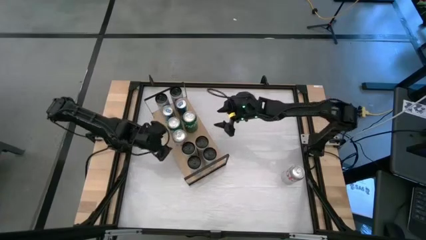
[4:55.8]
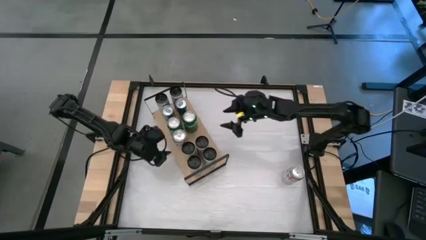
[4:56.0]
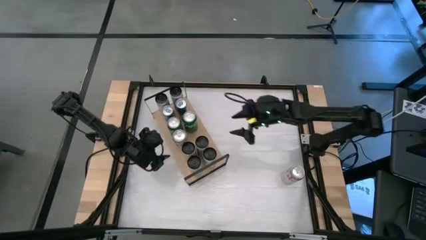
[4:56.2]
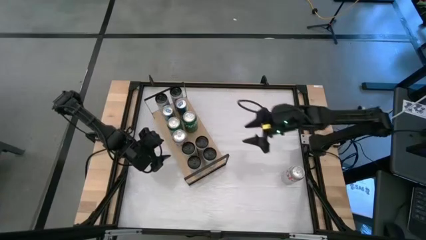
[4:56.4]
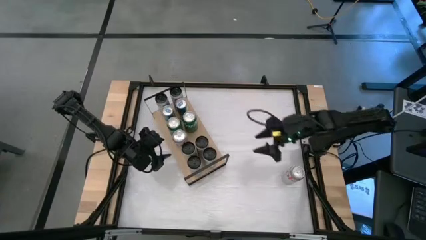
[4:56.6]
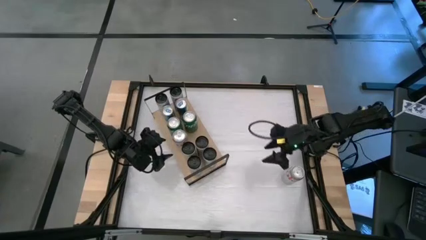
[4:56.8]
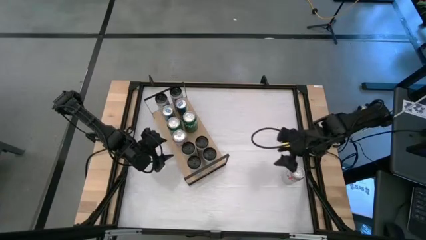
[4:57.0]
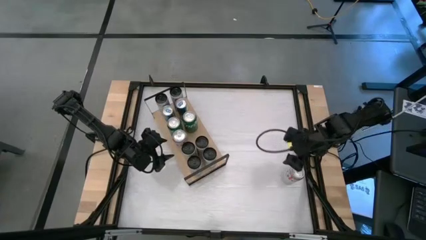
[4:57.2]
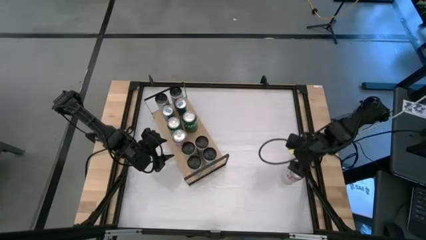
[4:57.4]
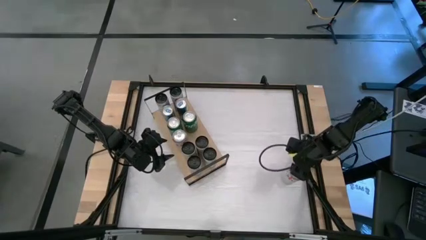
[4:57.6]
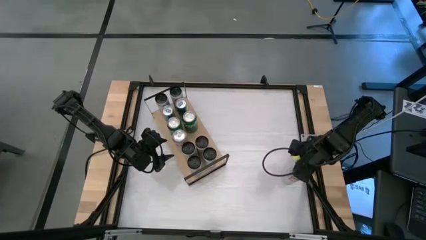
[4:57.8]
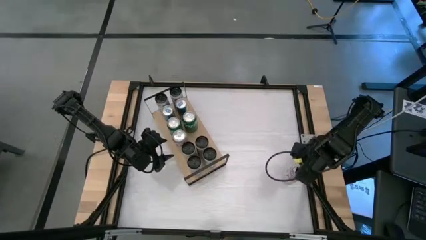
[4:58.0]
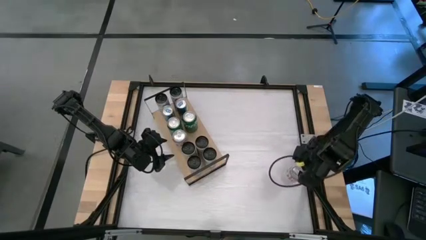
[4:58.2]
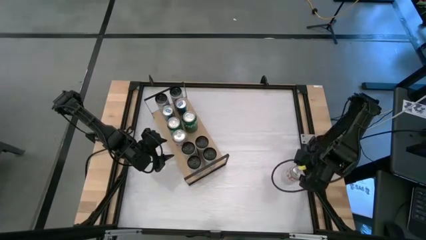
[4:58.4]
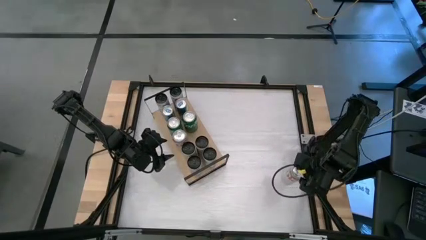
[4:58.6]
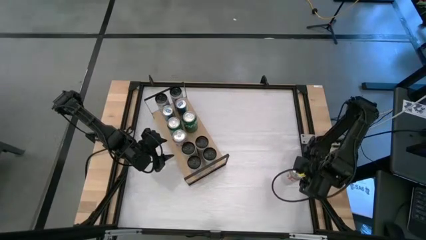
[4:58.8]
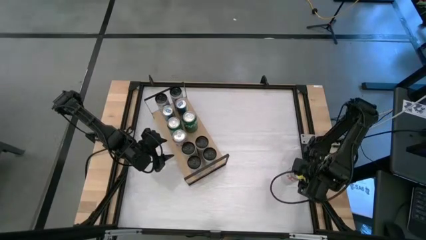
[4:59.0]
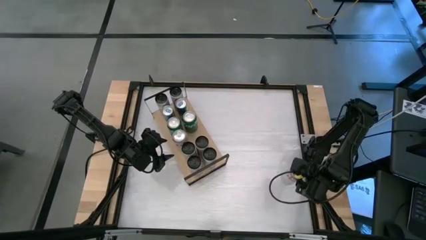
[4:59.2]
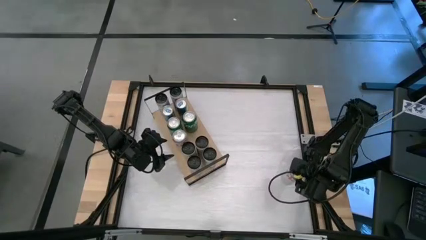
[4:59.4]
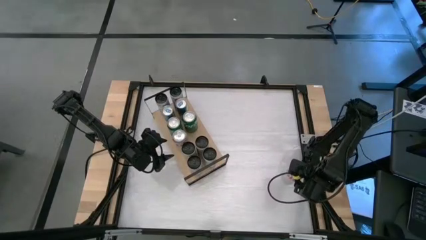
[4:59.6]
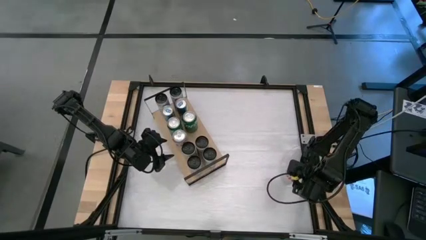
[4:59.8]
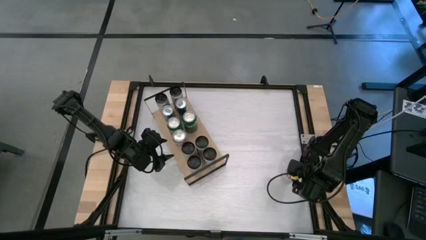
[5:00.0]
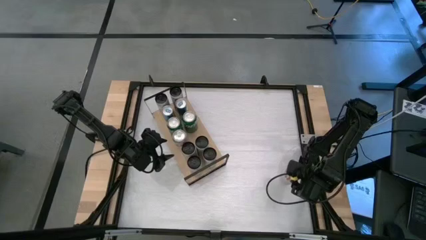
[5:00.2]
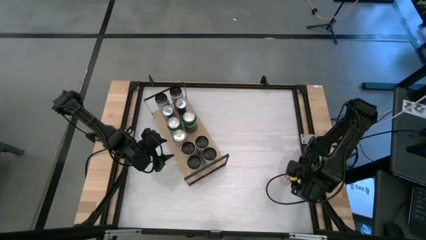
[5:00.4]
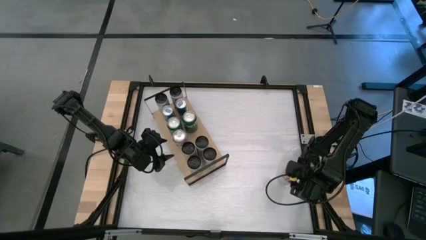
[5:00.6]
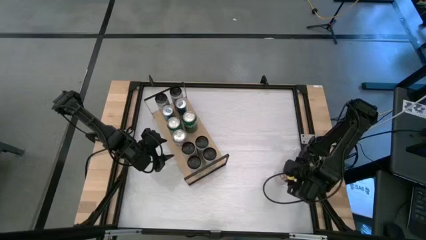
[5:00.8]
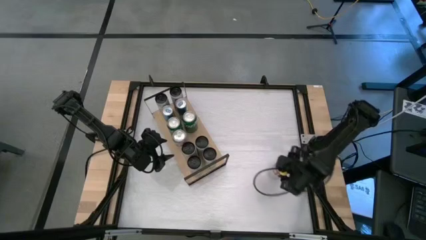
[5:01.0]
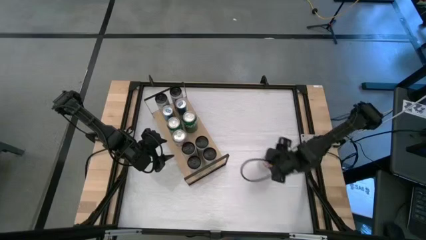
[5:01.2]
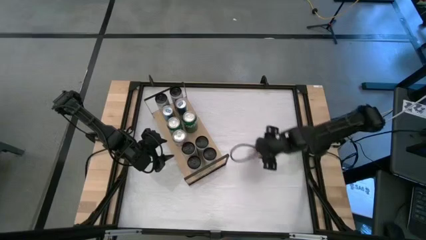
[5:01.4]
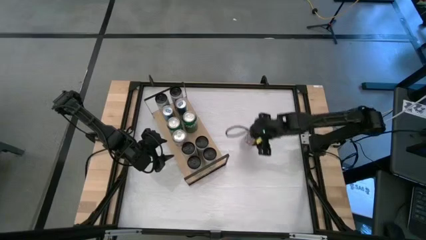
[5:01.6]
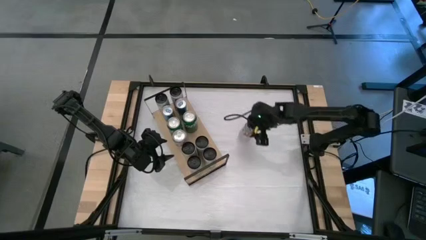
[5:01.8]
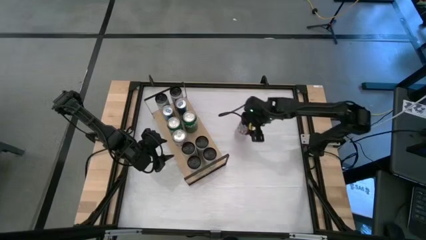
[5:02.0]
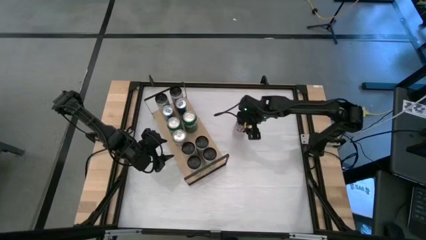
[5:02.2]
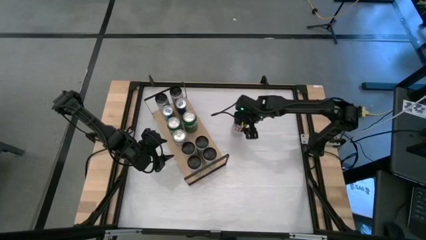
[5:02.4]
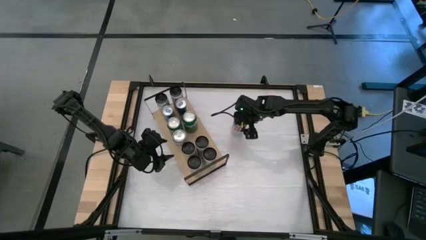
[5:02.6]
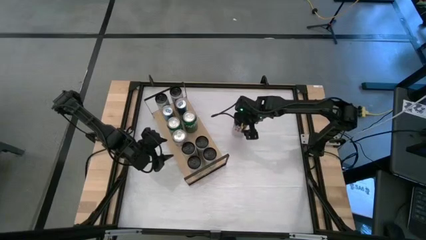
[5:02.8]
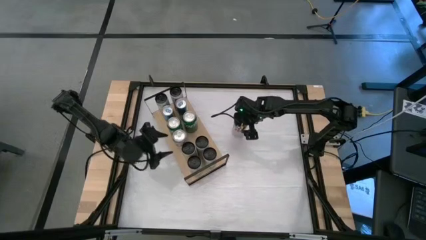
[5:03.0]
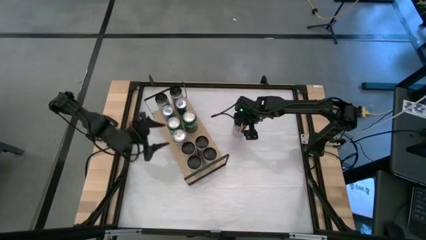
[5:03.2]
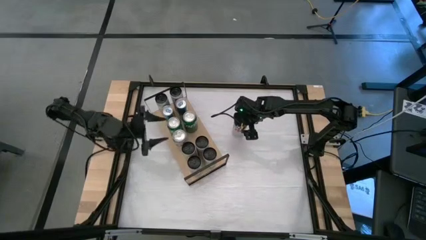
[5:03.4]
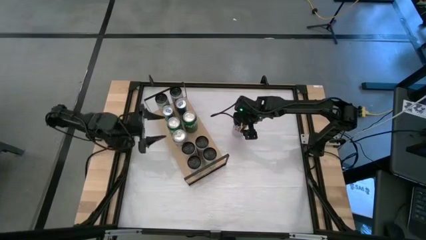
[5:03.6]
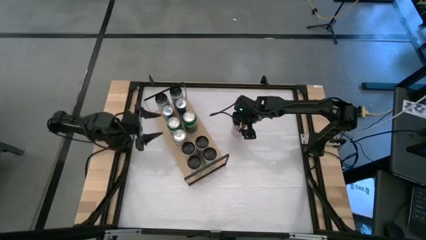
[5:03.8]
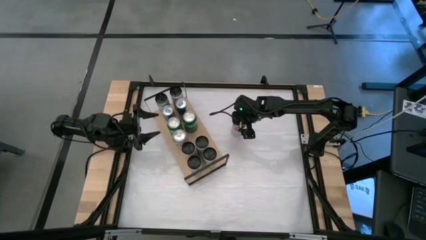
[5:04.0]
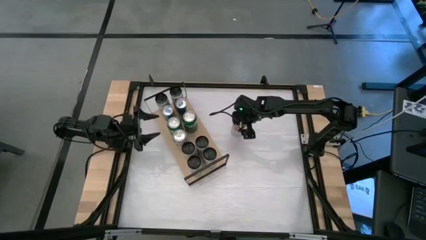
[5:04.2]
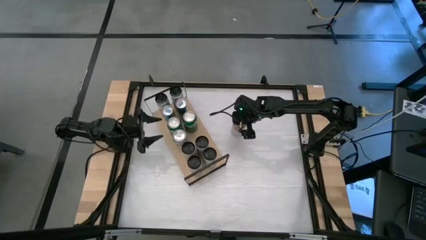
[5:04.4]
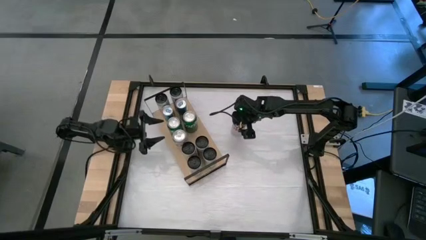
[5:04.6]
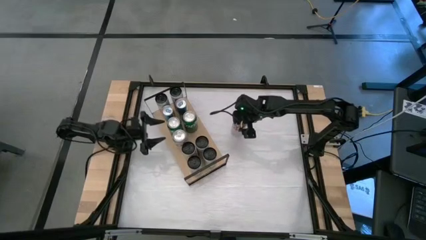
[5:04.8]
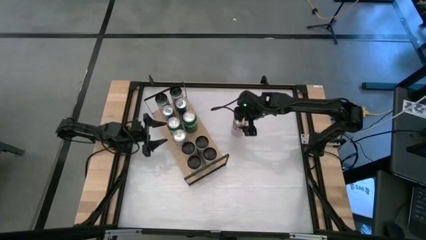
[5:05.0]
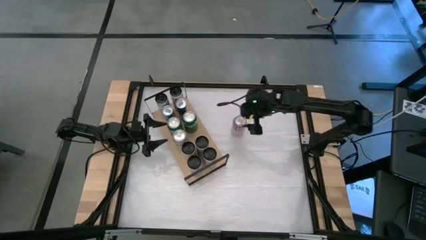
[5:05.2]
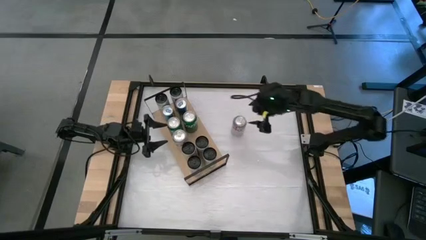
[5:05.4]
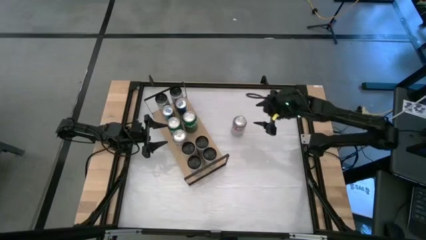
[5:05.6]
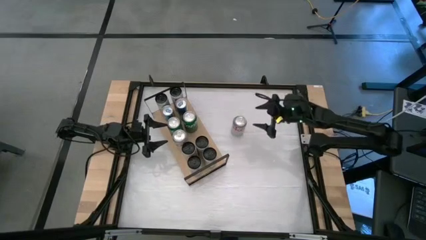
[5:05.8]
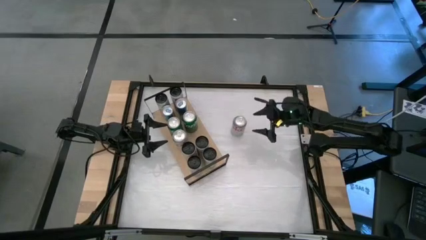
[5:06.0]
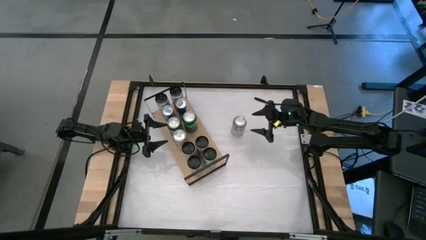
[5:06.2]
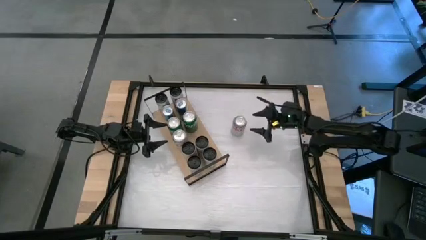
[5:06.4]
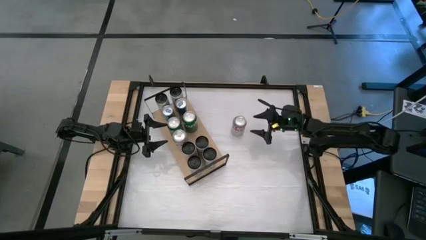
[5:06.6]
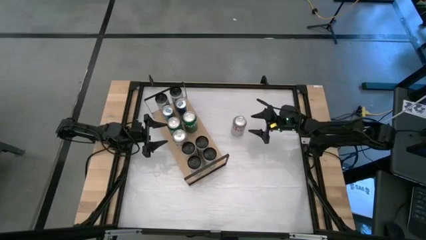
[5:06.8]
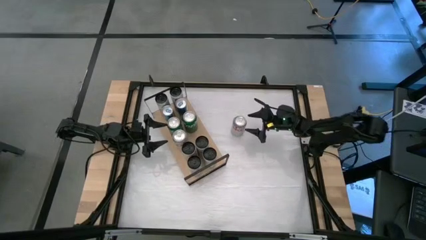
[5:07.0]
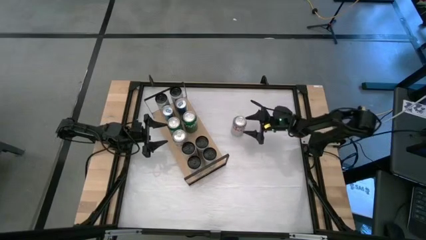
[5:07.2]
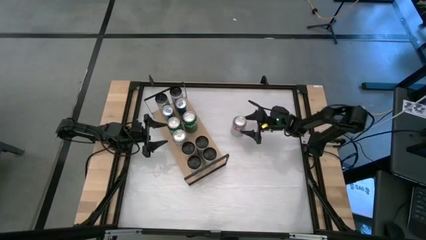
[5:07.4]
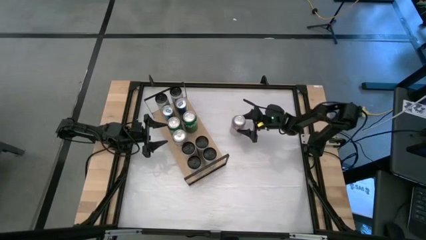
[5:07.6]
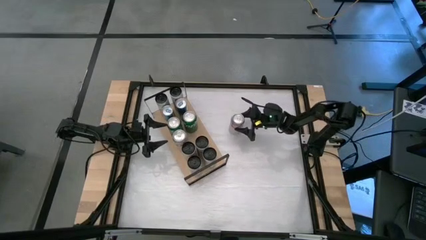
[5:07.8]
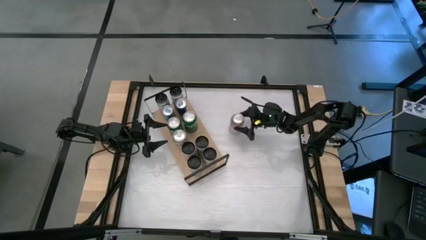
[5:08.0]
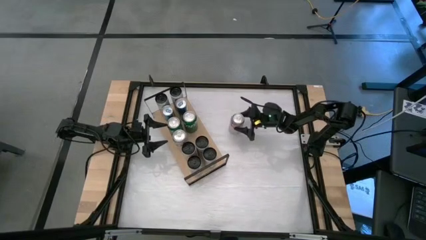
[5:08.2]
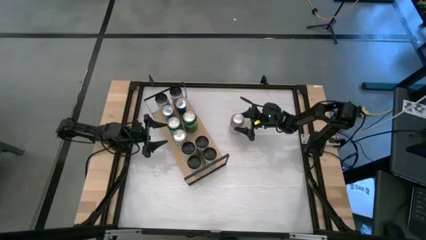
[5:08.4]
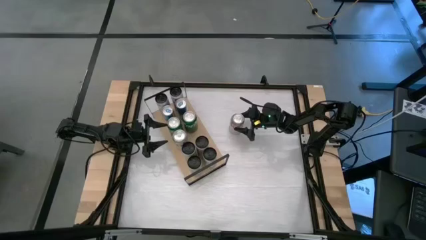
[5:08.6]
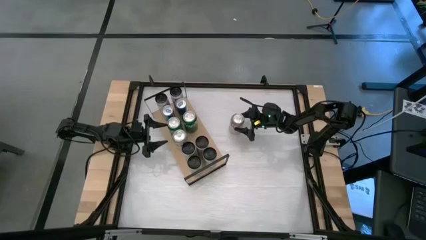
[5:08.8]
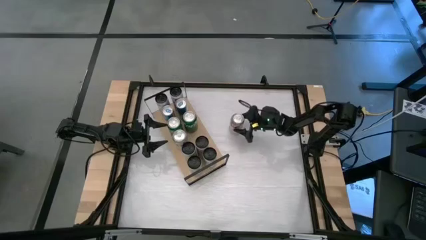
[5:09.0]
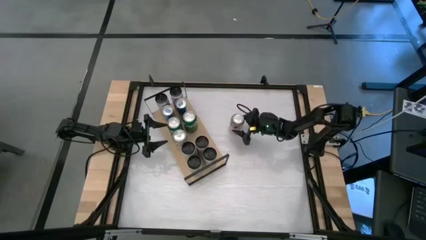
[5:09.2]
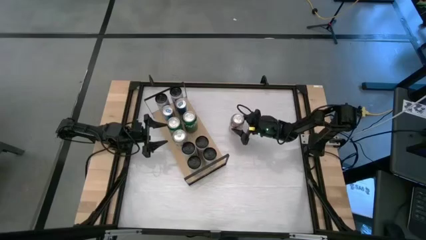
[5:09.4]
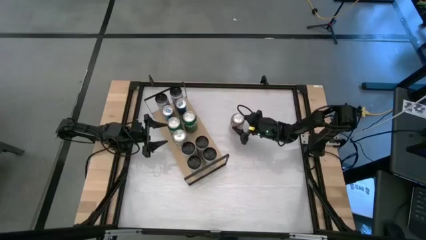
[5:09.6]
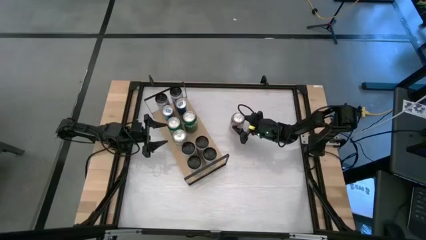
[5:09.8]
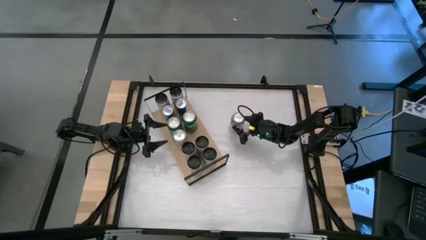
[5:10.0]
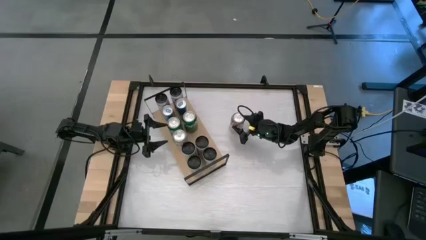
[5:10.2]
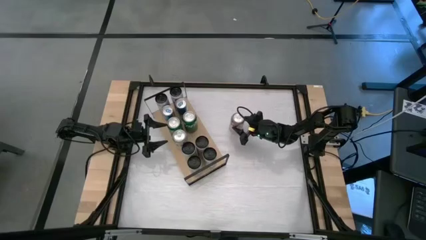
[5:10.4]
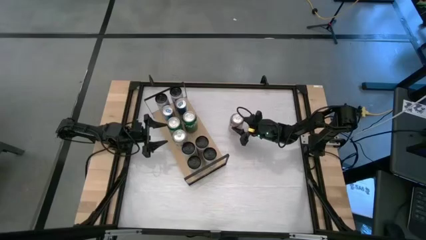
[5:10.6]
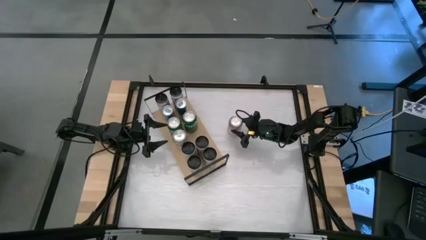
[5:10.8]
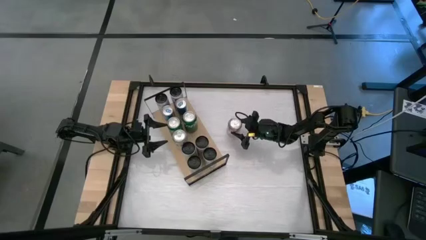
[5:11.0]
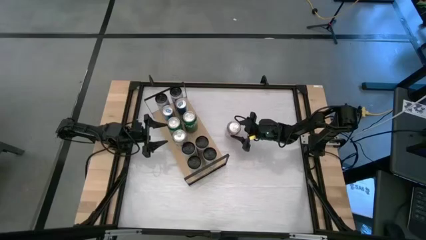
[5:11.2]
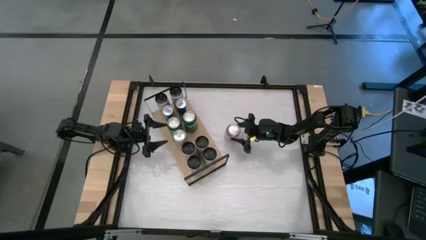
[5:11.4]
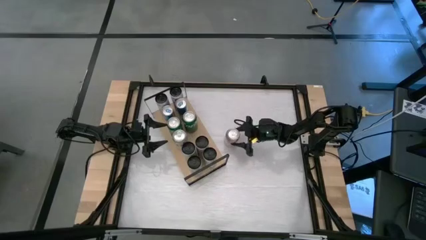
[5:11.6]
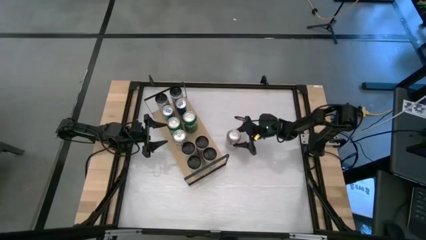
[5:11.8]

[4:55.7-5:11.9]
Task: Place canned beverage on shelf
Put the red silver soda can on the shelf aligned with the other red silver soda can
